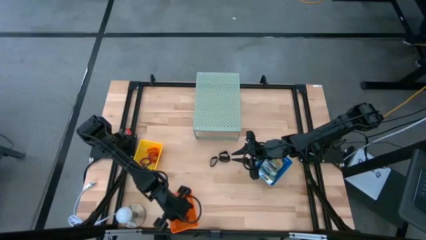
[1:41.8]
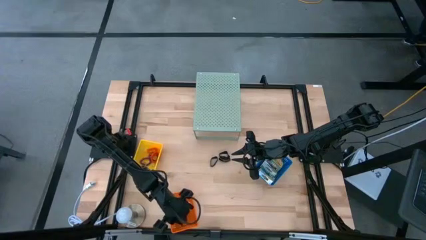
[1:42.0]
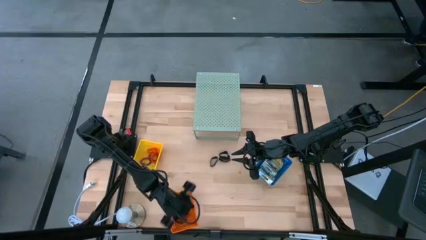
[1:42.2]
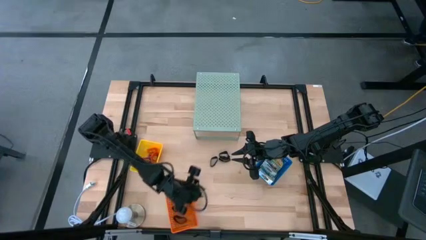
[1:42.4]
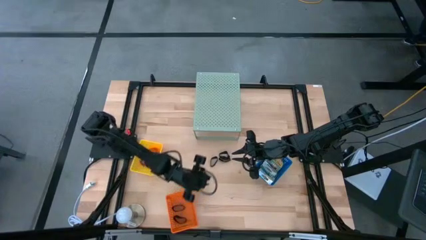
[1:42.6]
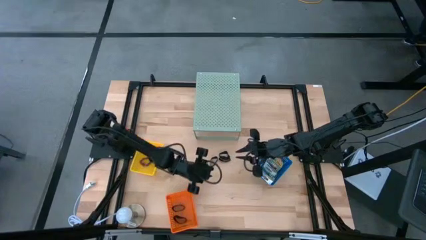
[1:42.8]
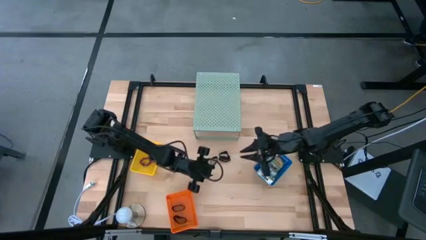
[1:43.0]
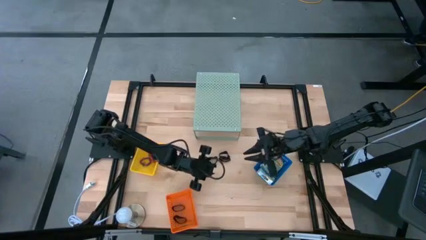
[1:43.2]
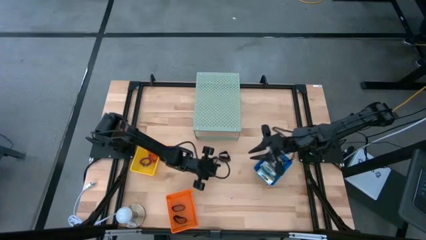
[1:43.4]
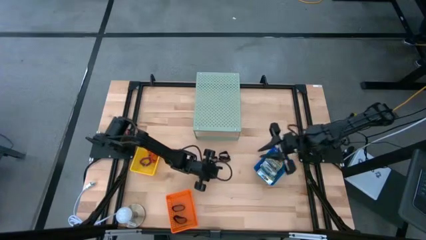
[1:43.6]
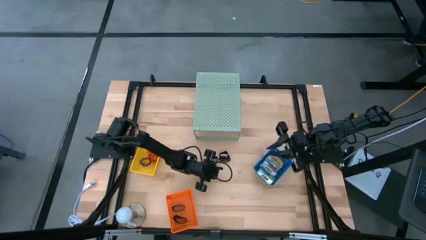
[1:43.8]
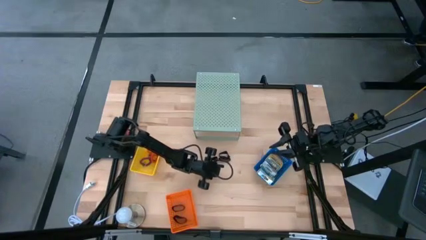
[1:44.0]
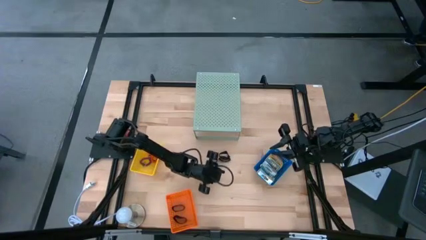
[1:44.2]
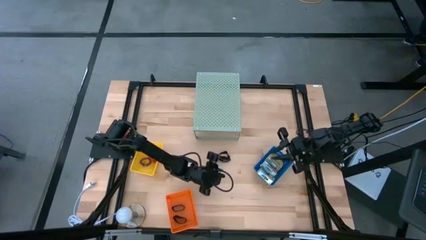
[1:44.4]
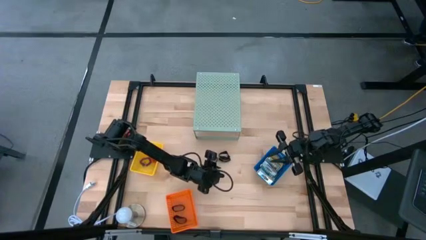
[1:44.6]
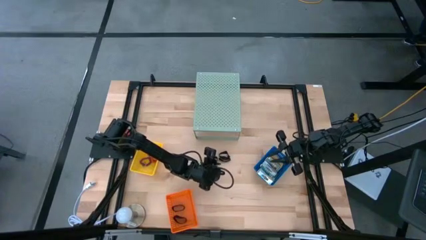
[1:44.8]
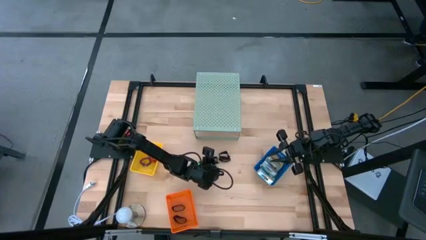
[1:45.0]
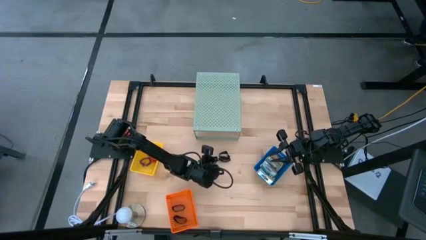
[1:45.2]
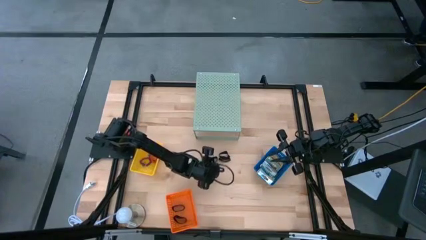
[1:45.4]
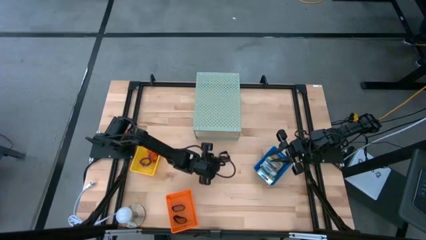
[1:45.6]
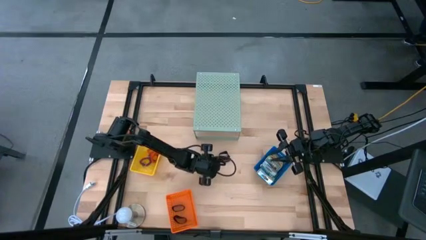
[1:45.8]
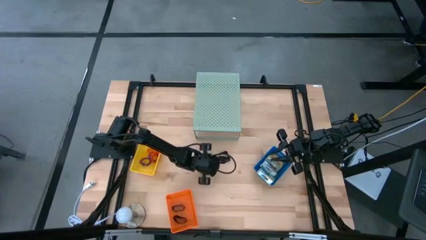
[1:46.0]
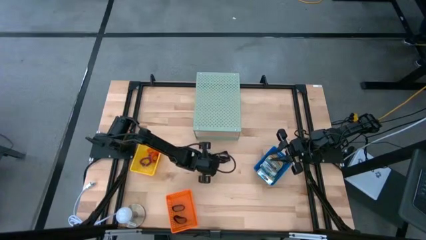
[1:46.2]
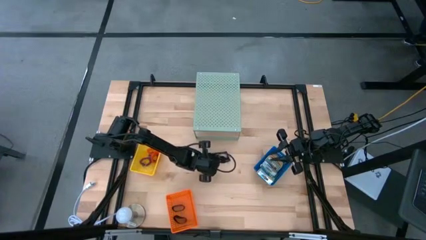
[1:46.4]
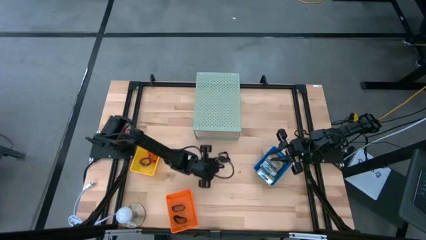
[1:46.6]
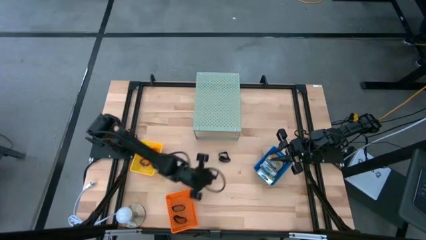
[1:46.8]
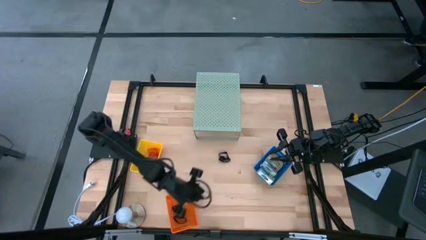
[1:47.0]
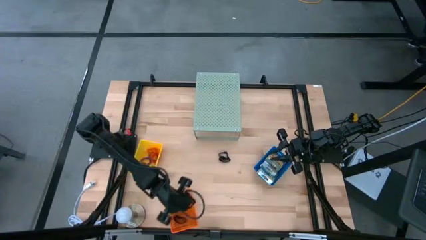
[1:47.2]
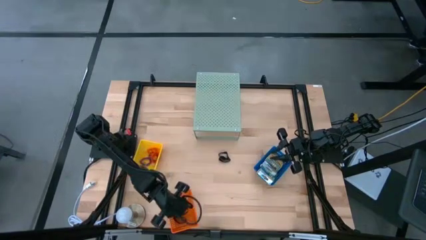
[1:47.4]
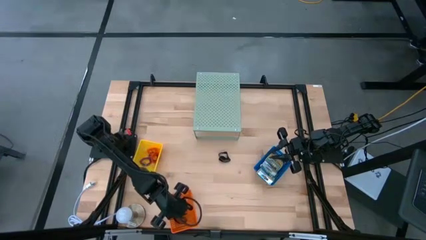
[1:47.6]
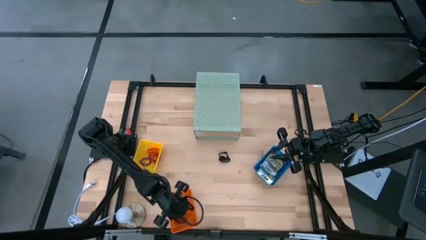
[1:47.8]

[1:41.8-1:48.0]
Task: Pick & Place Office Desk Supplies
Put the black rubber band into the orange bin

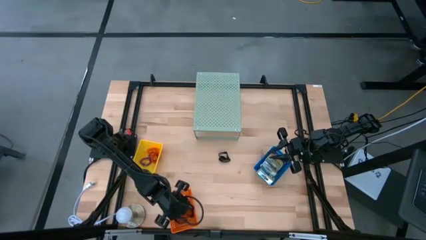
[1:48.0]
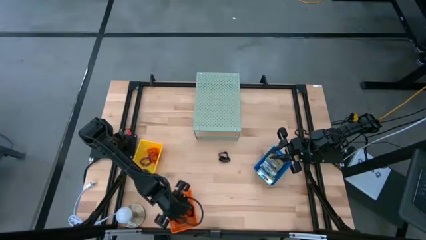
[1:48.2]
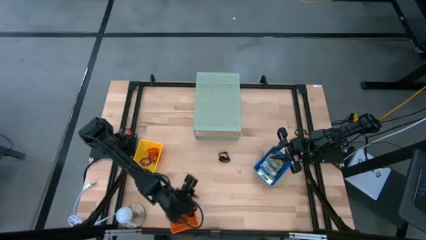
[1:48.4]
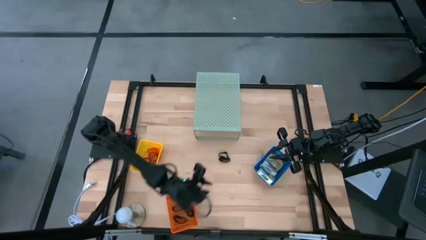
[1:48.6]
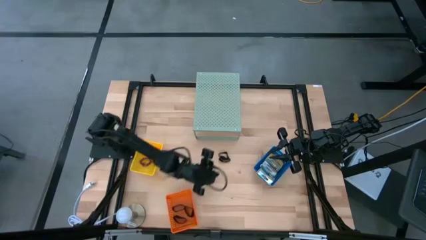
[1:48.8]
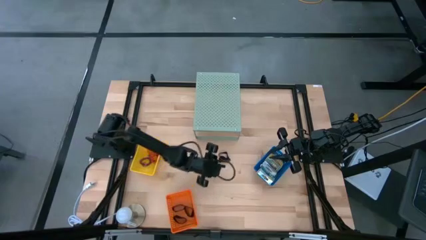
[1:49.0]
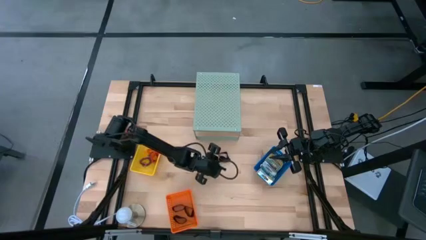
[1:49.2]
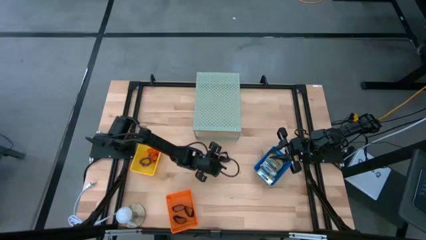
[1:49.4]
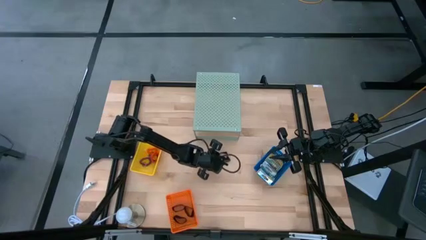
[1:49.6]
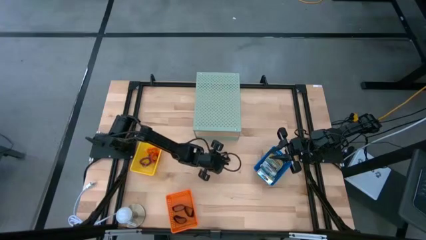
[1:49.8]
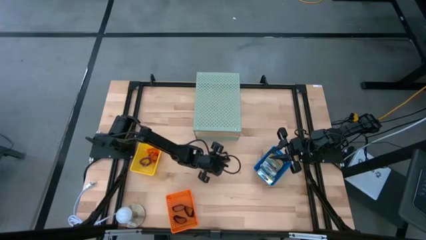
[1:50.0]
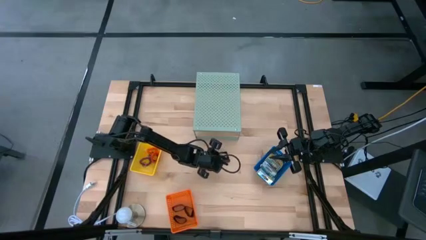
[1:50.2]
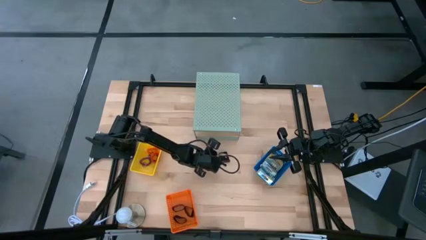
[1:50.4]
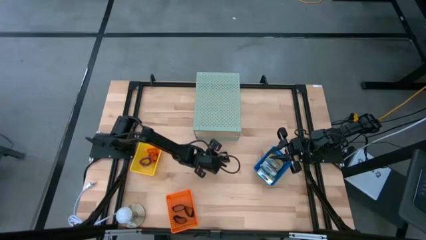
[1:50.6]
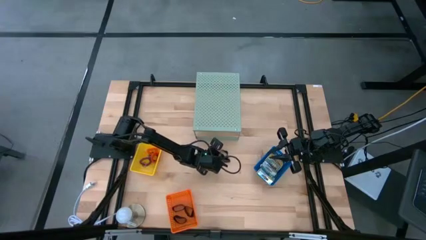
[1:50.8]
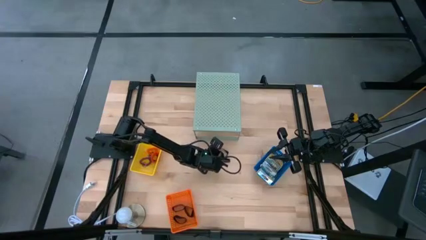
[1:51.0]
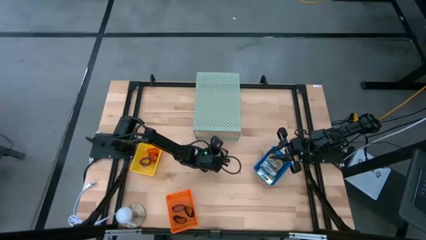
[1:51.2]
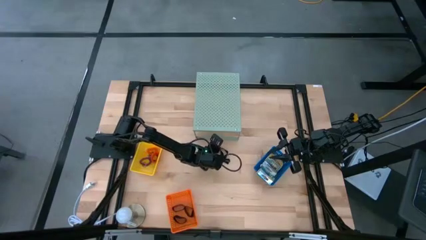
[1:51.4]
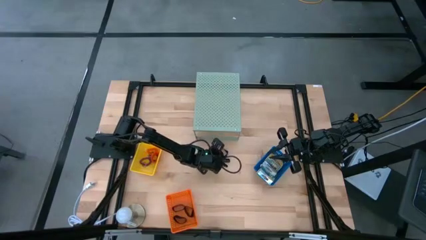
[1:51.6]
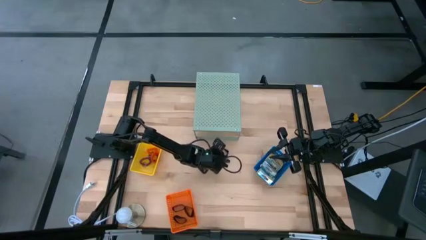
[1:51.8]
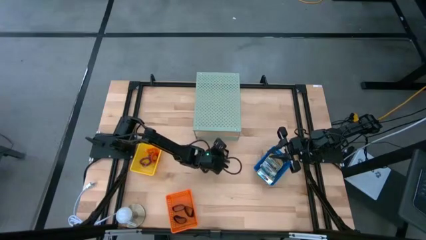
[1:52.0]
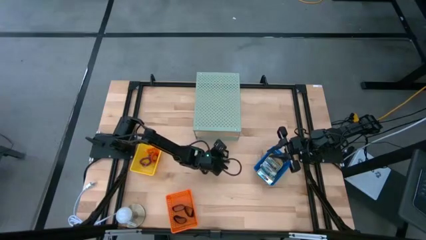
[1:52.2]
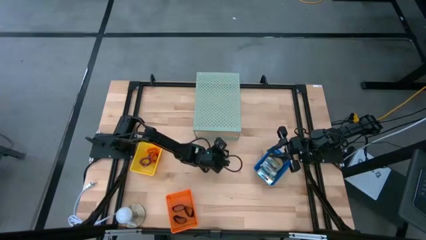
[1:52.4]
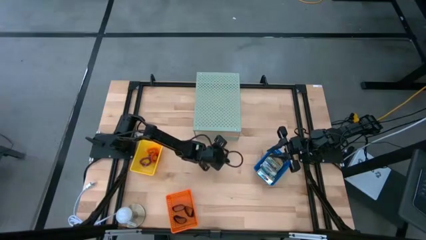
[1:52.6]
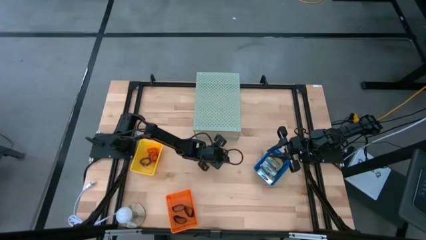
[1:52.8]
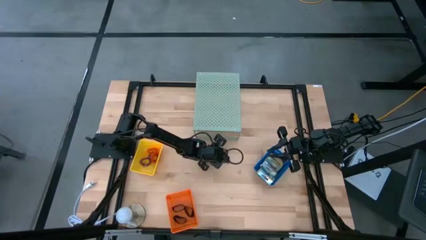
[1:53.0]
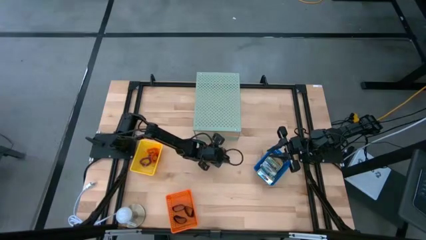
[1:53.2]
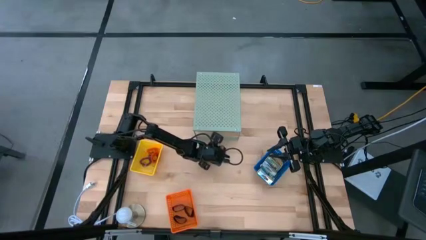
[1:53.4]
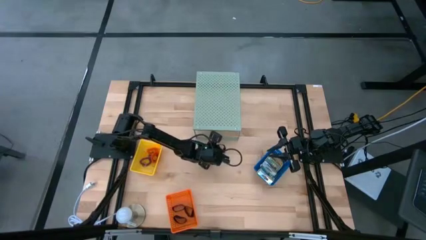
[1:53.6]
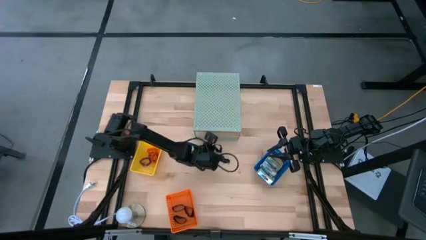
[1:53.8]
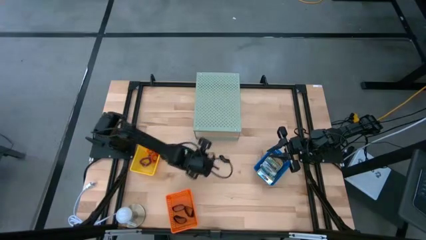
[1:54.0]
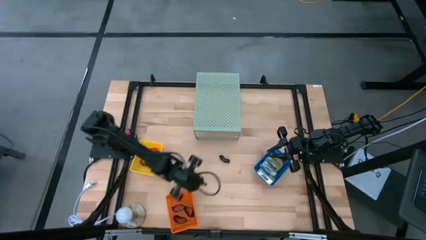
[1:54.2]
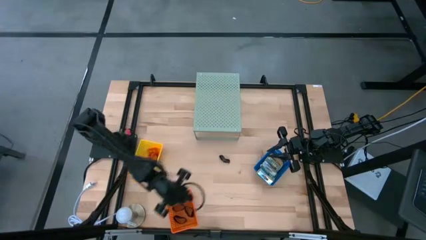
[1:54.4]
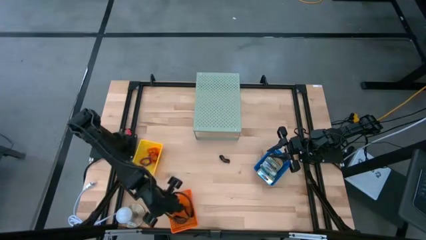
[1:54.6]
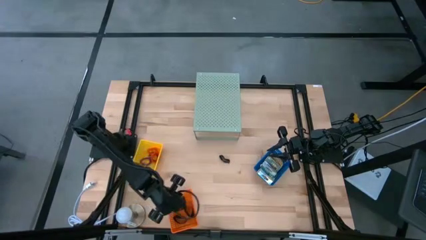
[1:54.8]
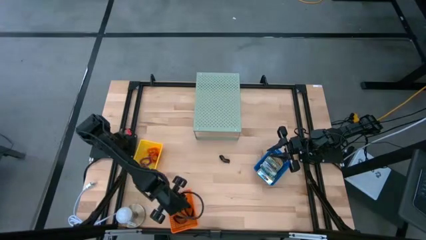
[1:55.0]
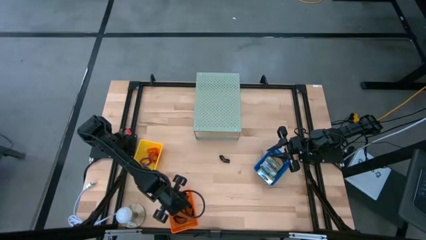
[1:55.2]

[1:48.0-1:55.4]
Put the black rubber band into the orange bin

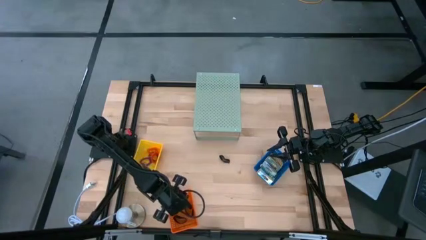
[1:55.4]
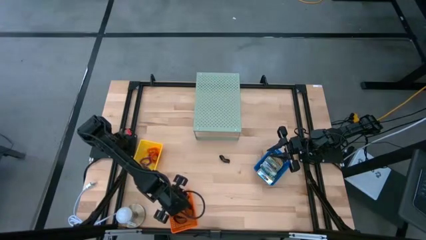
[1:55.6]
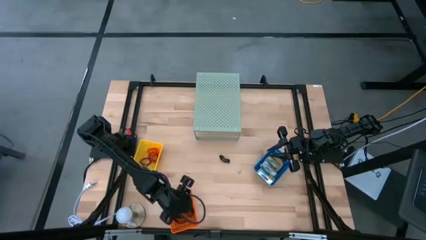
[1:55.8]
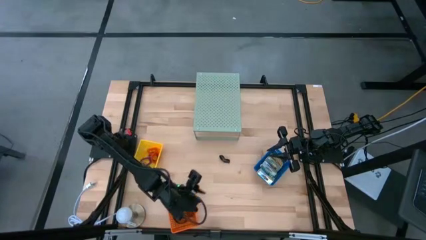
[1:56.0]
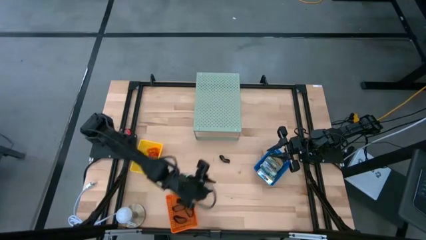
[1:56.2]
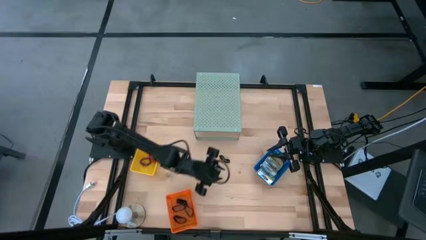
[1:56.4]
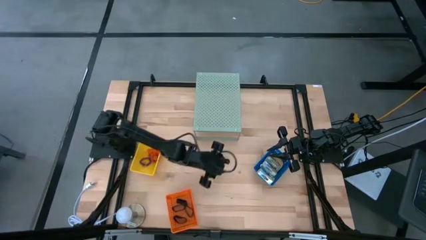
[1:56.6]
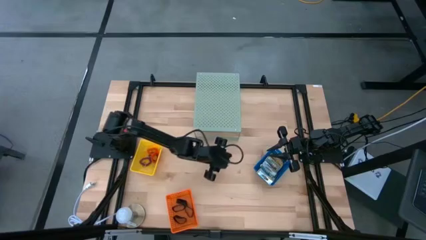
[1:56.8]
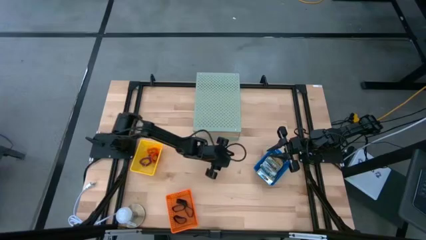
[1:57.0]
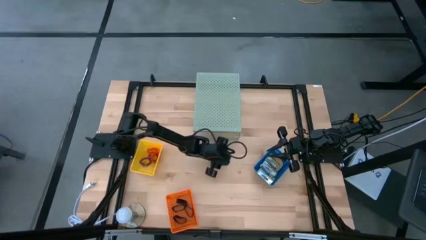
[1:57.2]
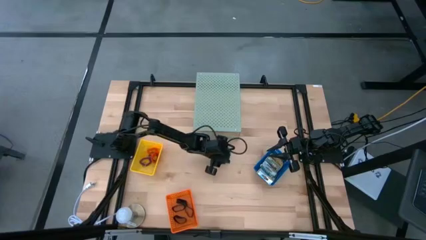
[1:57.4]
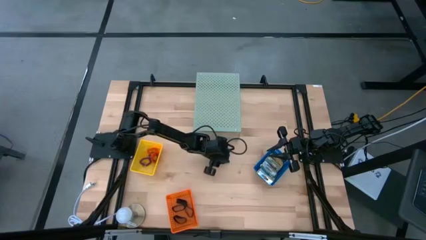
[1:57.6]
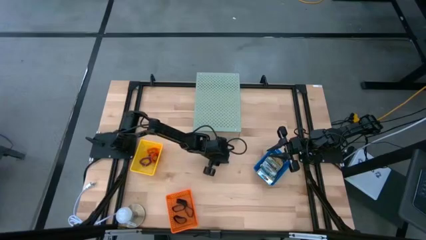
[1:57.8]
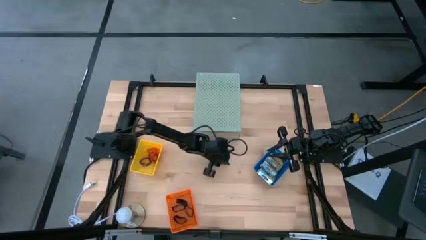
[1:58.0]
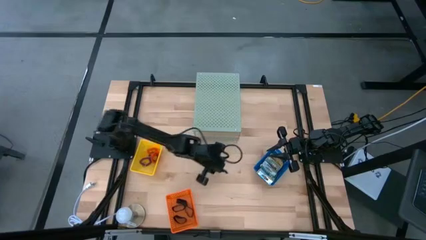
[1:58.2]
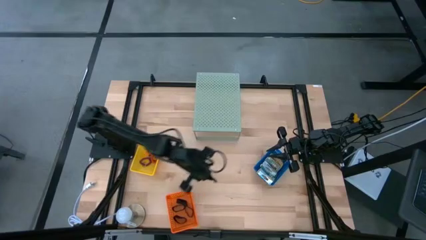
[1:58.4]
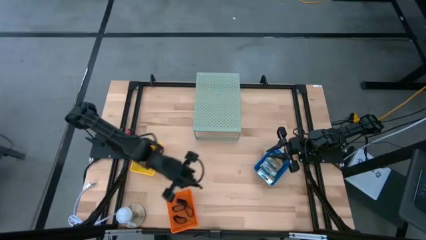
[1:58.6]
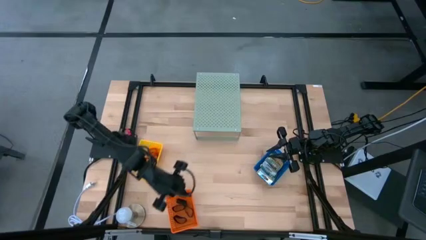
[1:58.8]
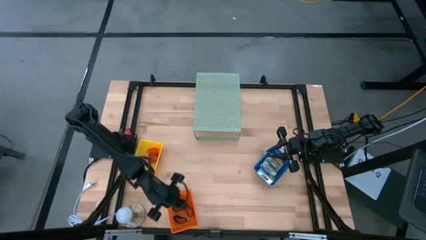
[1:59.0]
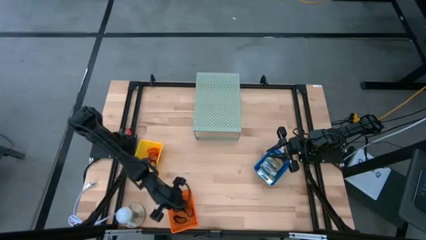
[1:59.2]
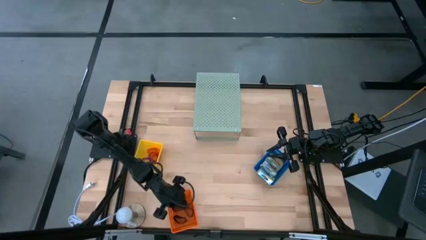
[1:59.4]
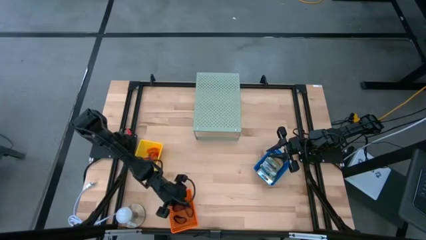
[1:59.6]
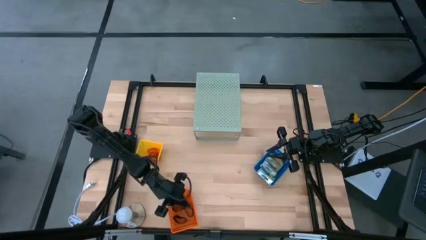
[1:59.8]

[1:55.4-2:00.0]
Put the black rubber band into the orange bin
